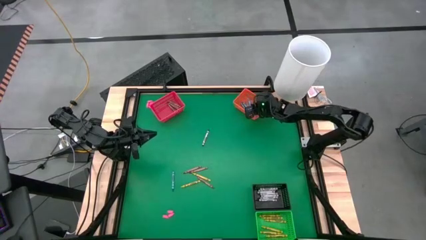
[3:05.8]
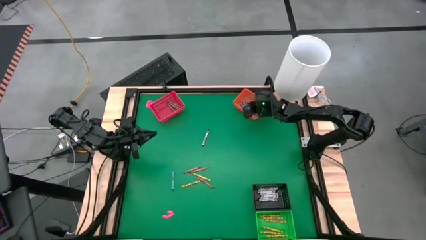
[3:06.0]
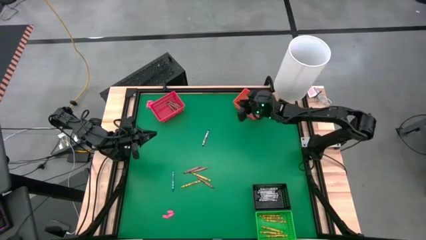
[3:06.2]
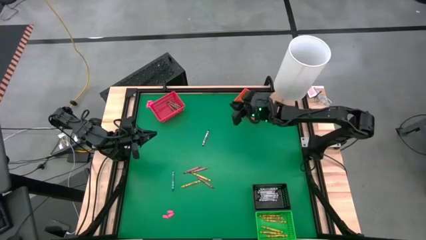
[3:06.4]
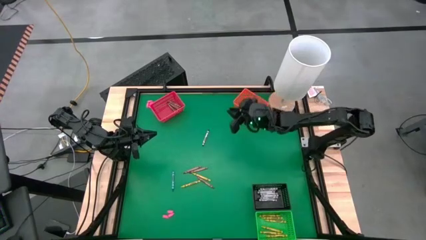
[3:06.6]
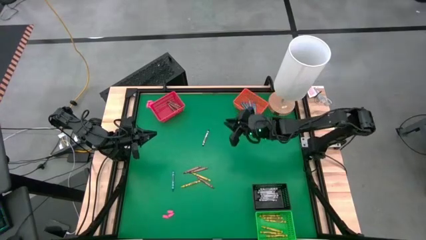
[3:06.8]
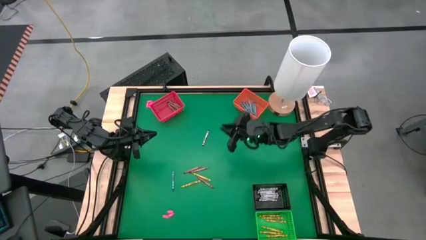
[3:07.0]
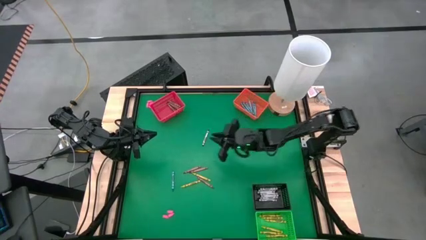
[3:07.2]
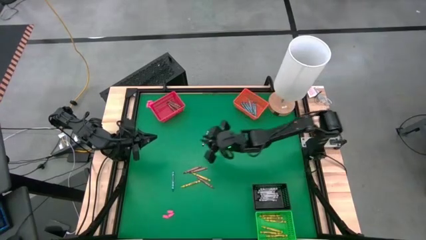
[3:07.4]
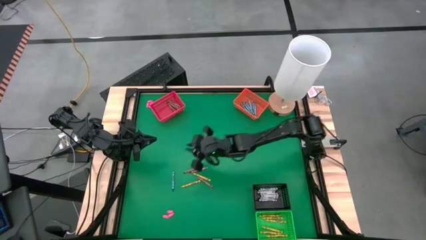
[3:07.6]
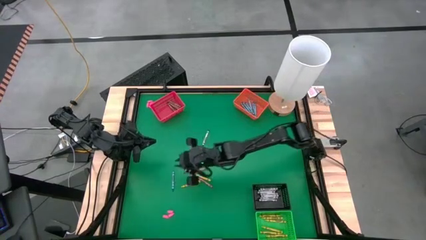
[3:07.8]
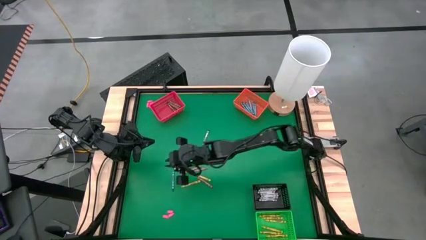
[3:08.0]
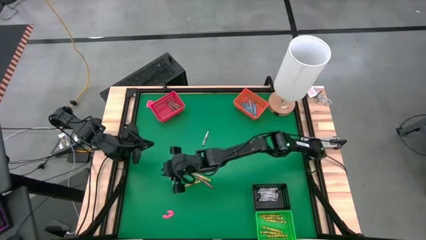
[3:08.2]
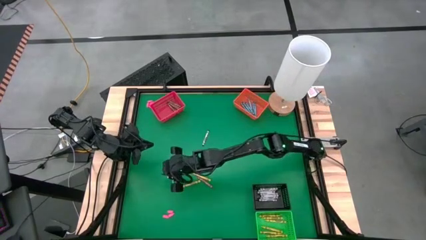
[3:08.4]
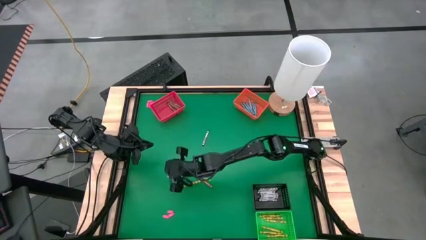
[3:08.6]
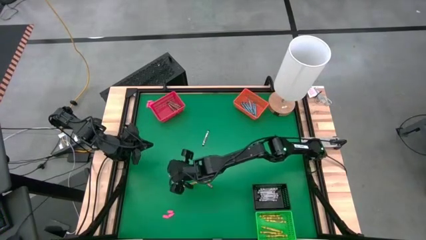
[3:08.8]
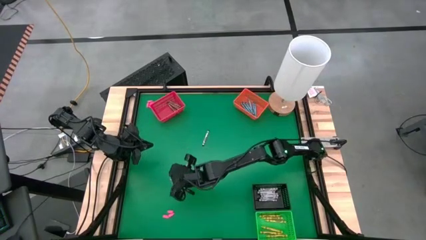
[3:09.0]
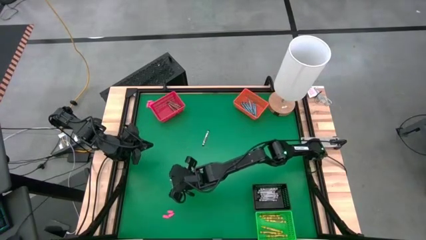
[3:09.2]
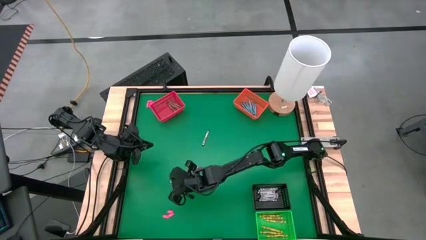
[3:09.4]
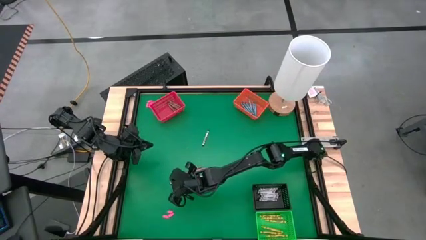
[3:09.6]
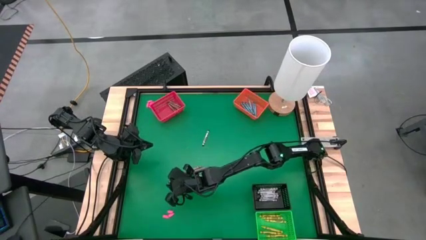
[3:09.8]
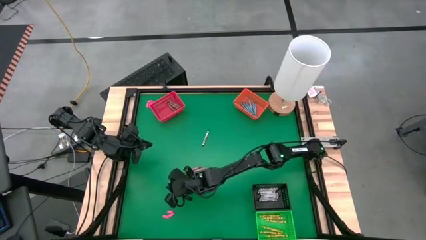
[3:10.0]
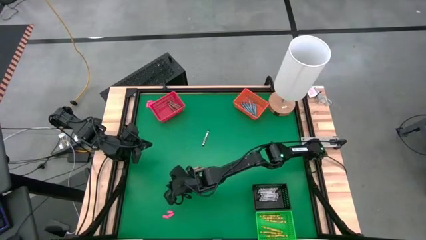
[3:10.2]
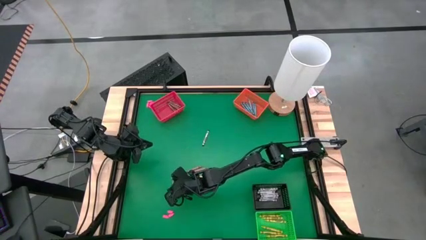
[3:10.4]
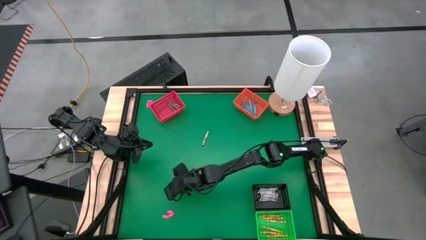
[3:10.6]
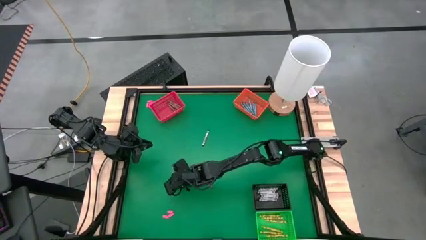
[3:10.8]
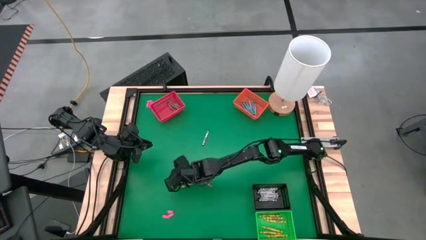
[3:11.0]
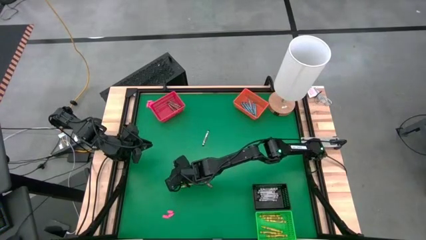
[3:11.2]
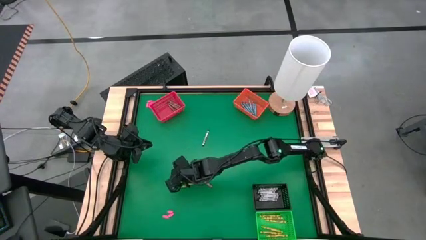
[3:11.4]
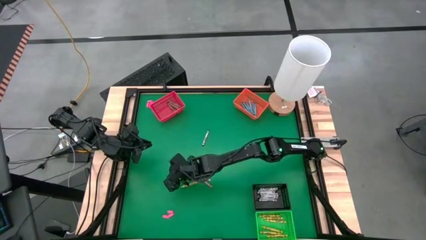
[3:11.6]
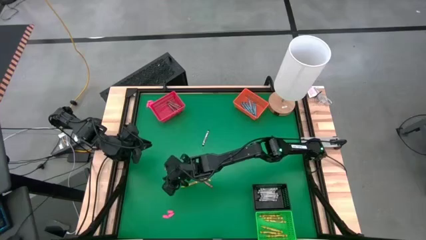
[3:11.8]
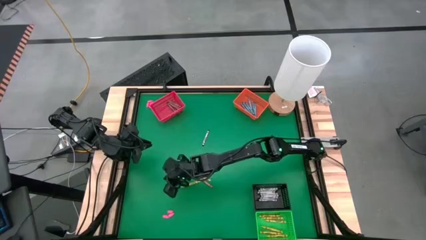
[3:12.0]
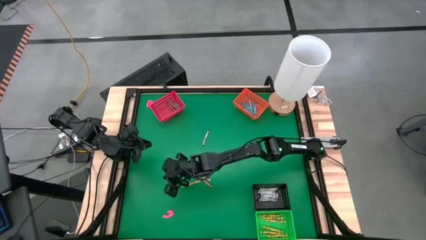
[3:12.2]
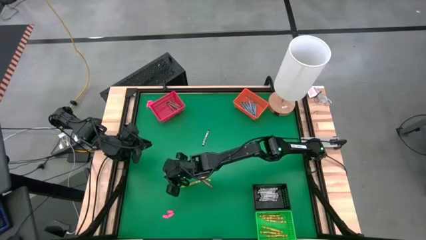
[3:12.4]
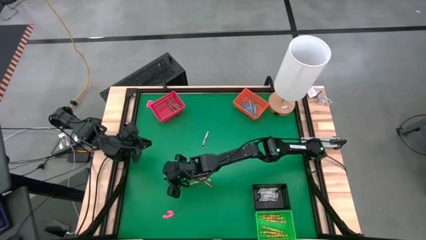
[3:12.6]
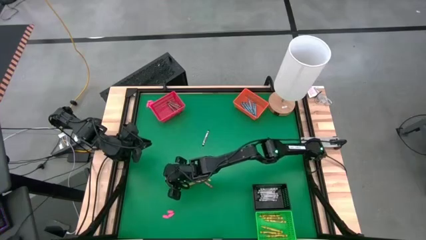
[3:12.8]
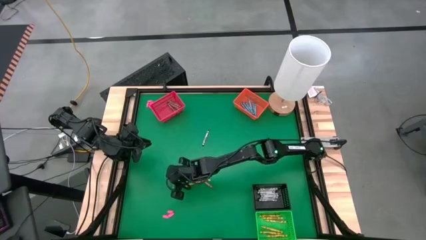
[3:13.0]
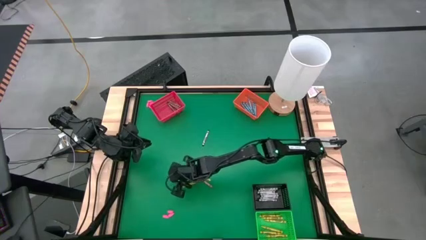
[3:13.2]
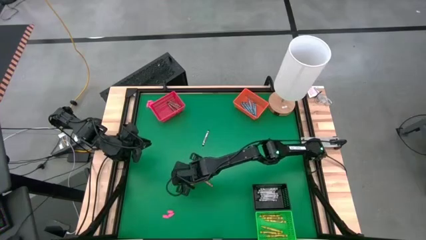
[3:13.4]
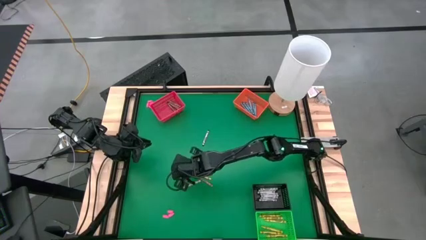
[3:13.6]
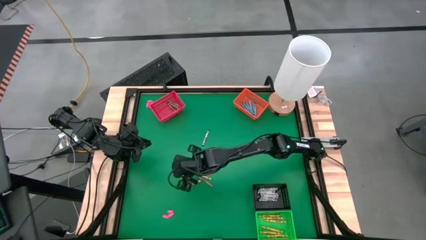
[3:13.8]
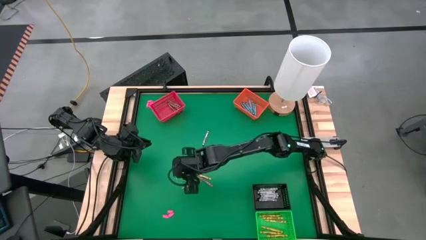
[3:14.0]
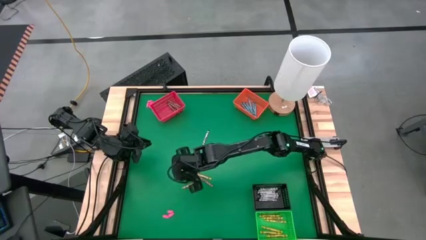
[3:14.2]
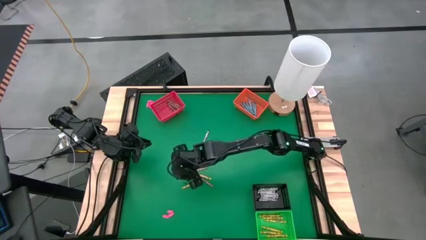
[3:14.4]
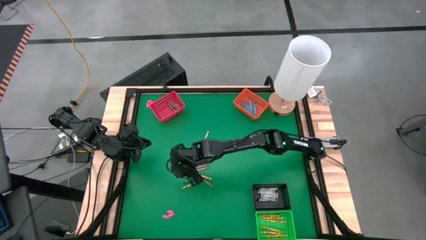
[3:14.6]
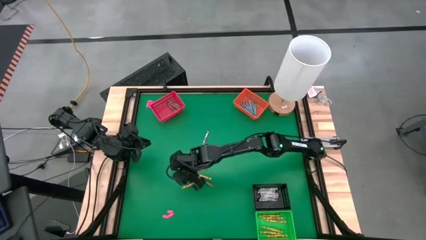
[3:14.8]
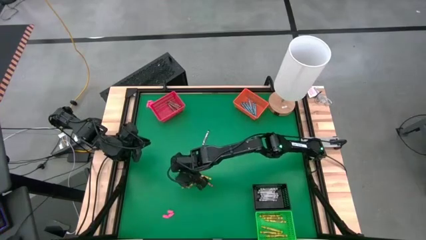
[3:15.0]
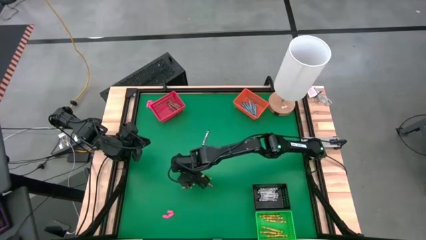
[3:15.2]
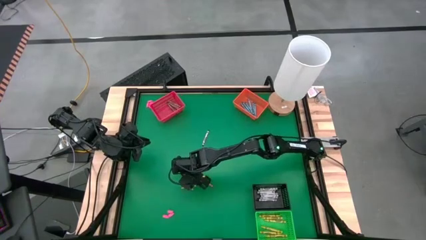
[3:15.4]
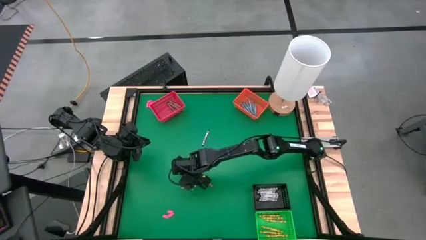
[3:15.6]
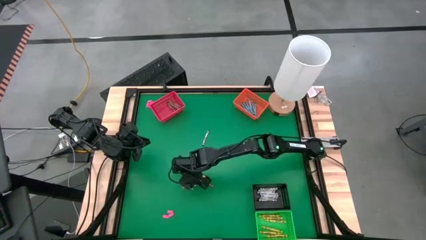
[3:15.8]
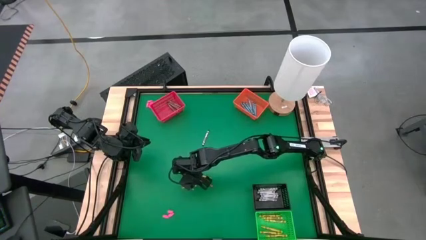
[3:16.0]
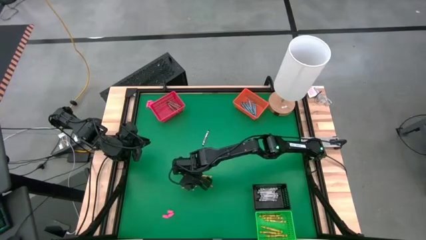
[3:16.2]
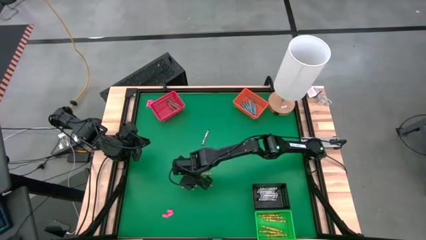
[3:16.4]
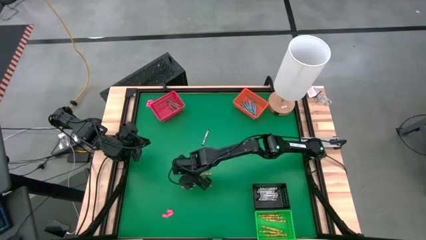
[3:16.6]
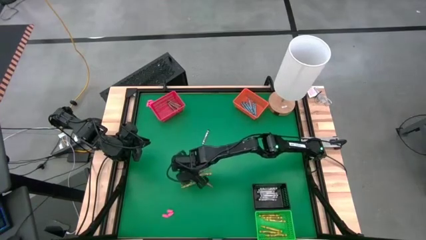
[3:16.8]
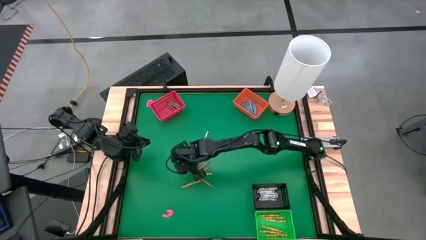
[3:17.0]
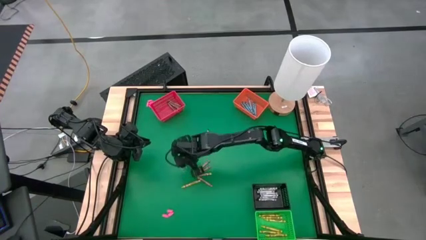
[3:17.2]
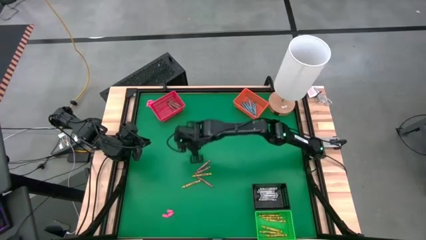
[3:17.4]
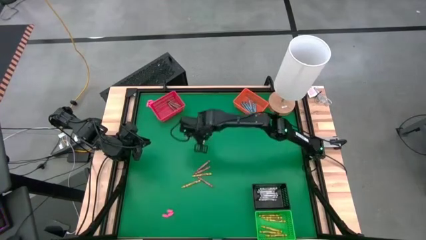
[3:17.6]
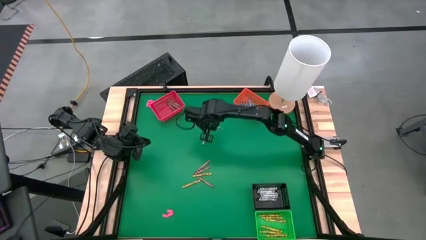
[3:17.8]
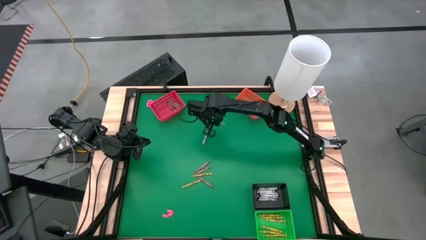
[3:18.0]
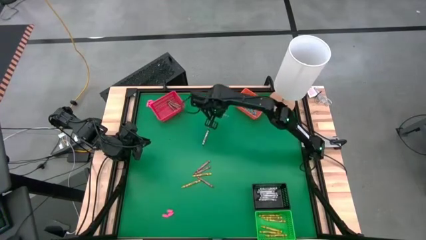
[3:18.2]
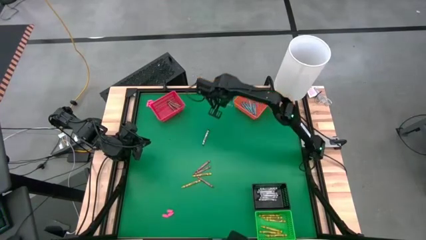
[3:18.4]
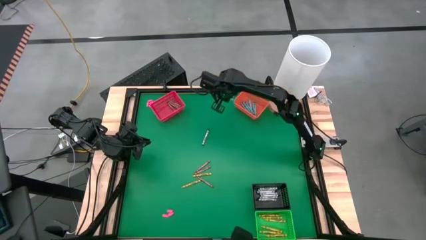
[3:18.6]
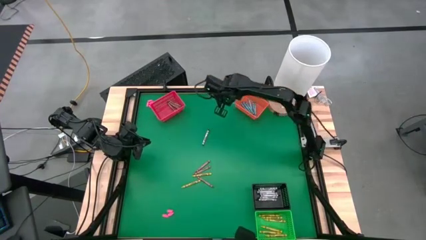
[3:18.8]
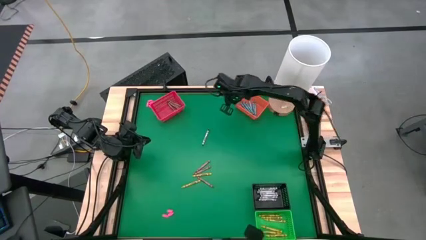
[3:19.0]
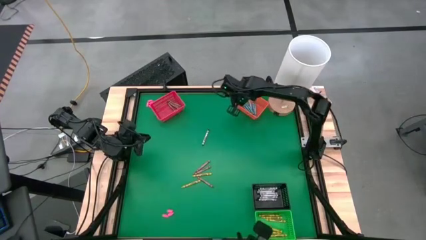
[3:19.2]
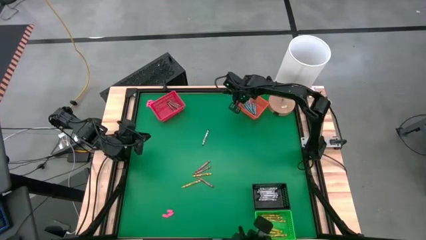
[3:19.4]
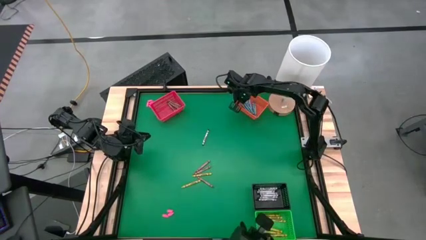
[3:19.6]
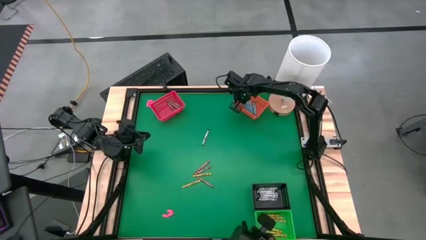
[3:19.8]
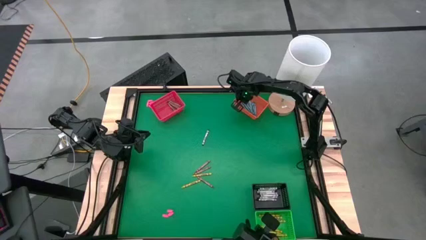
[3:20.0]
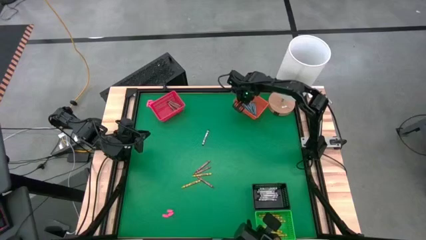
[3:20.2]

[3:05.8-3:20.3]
Task: Sort crayons
Put the blue crayon into the orange bin
